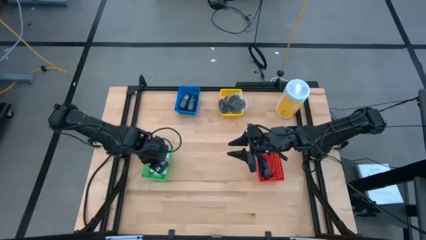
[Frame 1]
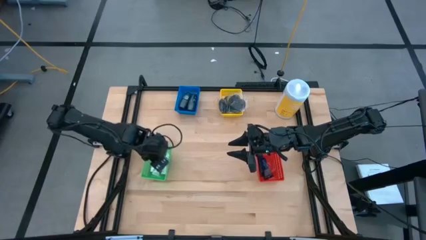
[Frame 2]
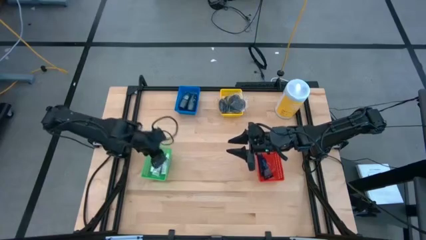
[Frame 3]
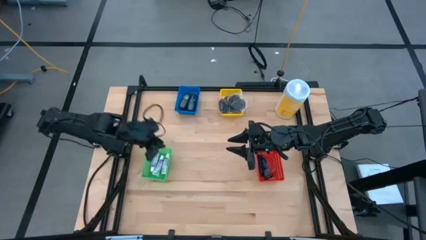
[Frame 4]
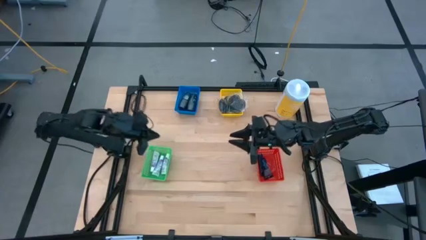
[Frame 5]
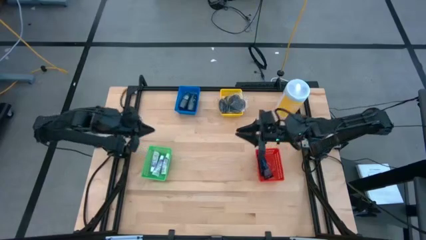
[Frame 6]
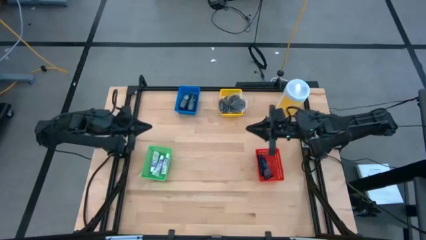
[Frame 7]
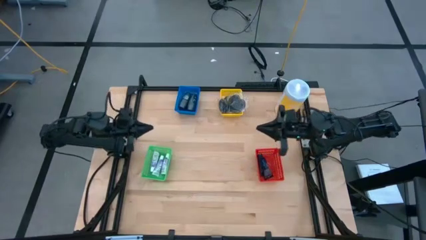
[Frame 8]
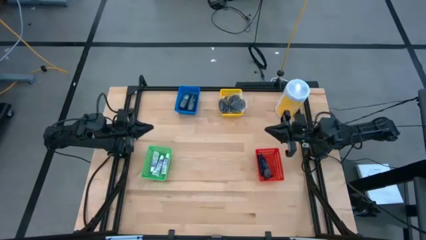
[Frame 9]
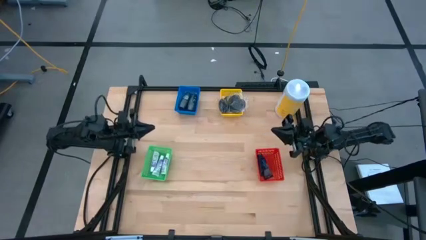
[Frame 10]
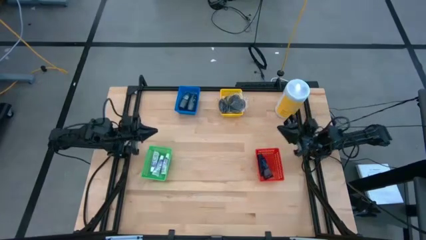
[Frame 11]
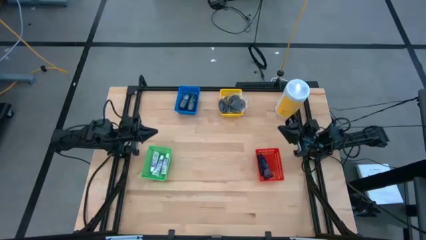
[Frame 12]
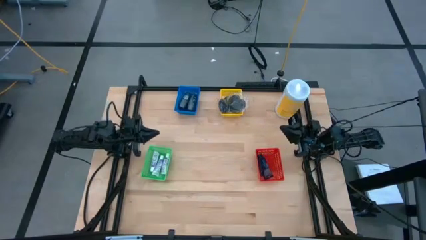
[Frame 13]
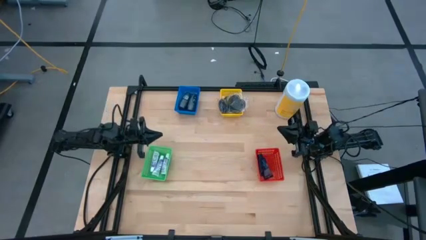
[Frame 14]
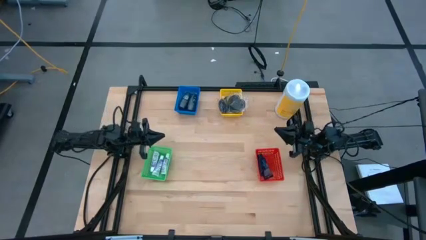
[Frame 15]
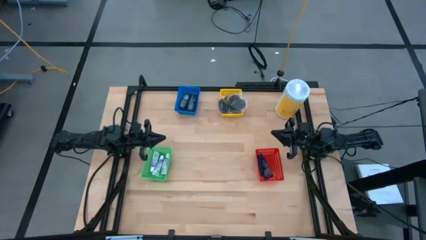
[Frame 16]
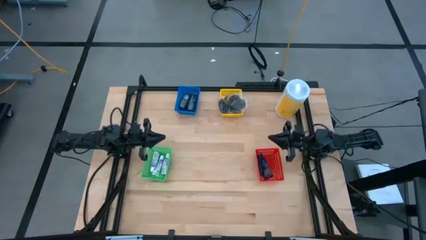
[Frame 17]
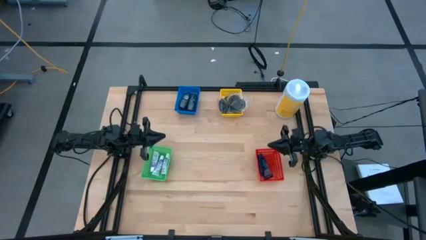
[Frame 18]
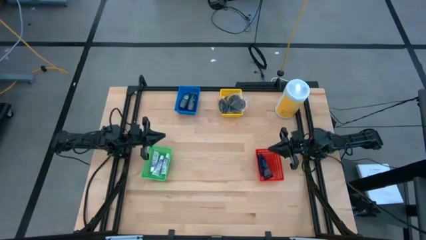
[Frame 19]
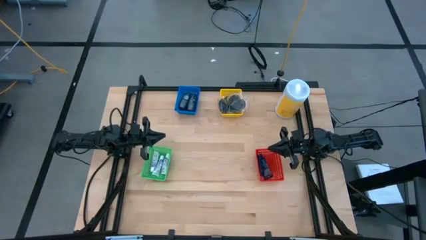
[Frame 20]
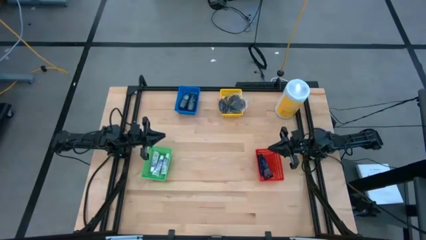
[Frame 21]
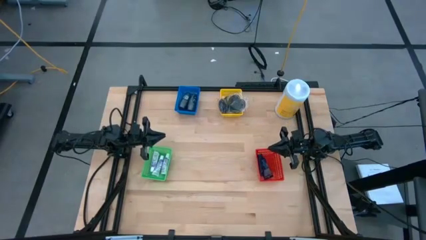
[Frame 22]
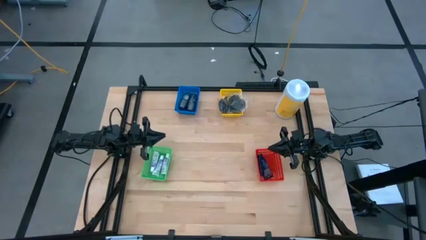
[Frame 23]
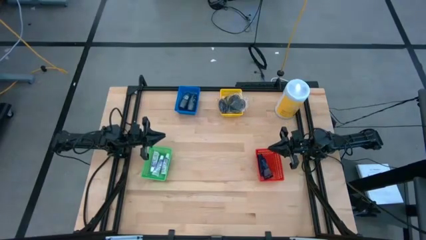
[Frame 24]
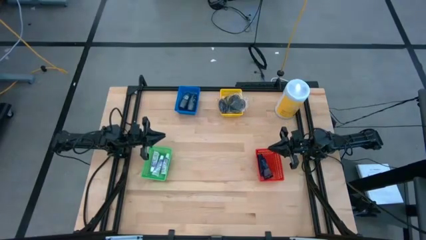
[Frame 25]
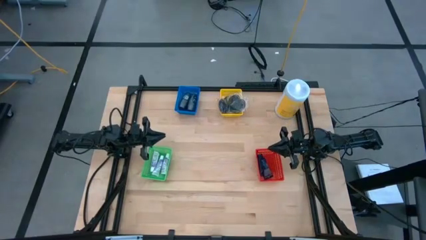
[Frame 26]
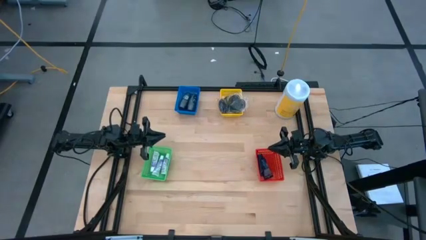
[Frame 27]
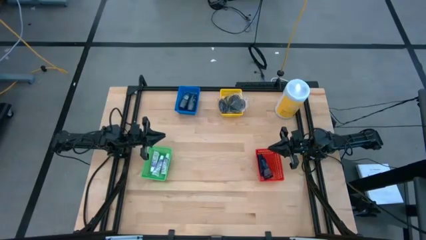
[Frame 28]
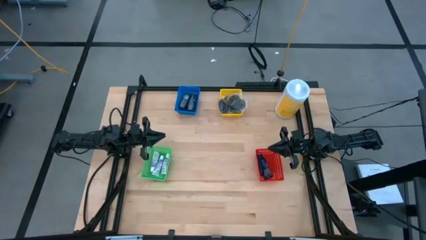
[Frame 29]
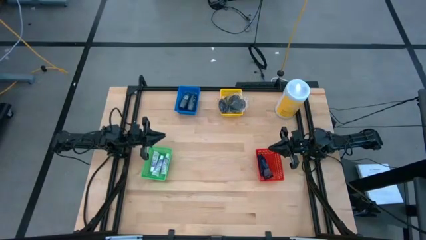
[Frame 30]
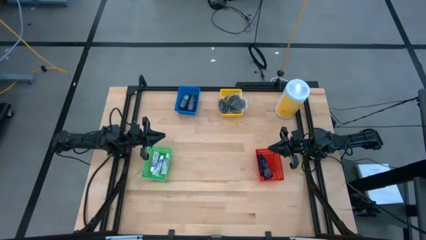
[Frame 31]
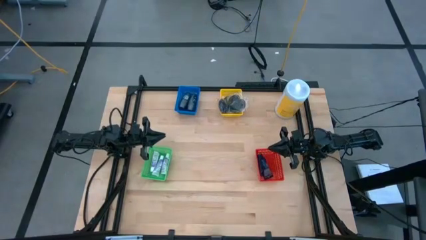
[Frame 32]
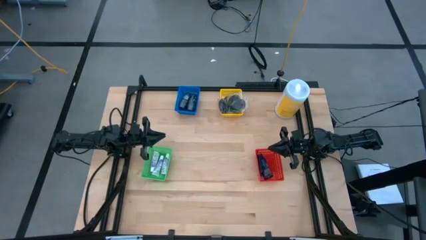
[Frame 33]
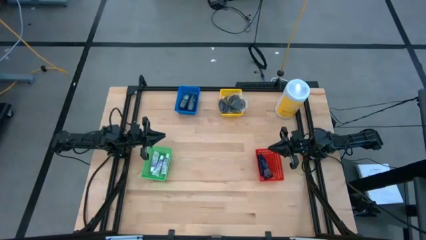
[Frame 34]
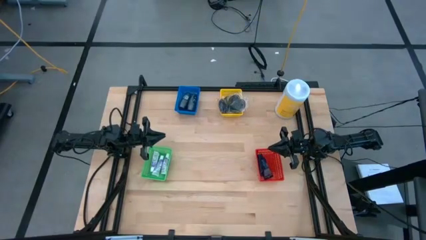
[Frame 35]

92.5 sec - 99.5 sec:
Task: Pick & Place Travel size toiletries
Return to Home Position

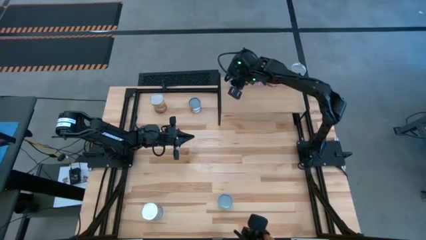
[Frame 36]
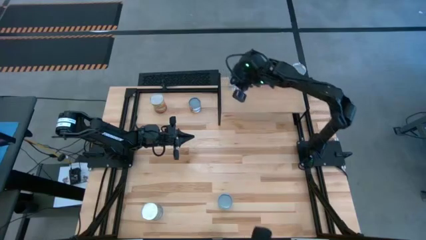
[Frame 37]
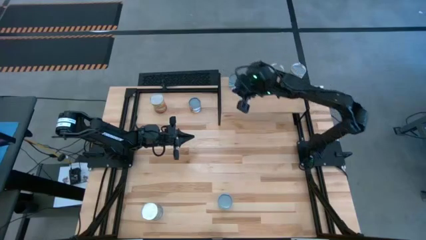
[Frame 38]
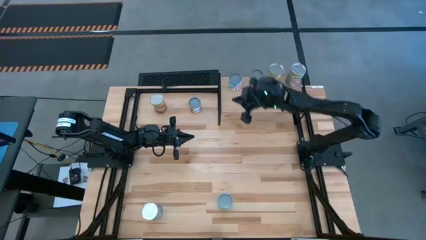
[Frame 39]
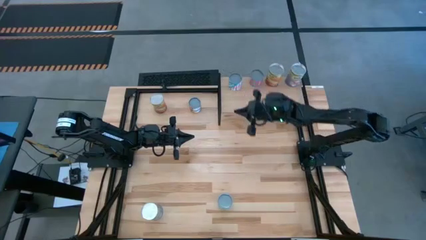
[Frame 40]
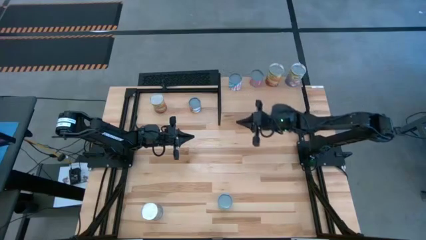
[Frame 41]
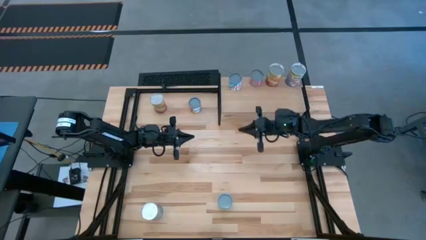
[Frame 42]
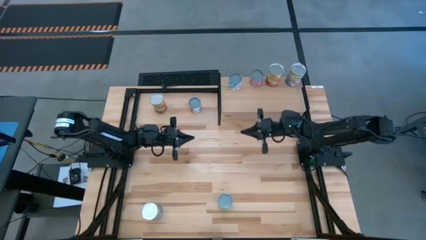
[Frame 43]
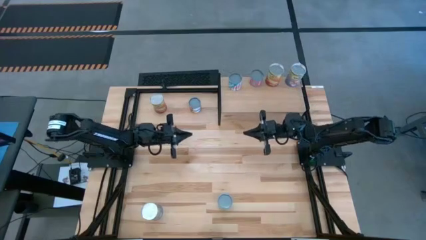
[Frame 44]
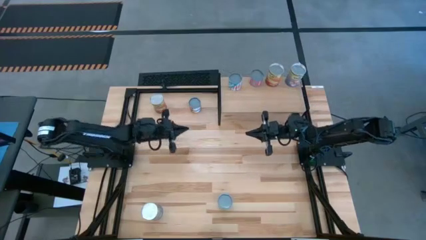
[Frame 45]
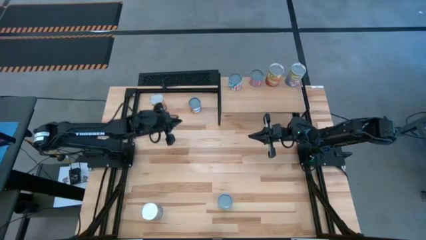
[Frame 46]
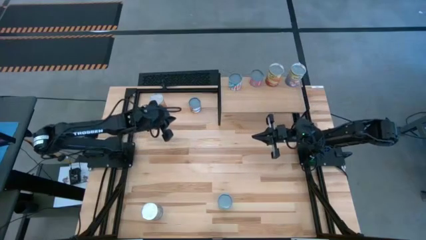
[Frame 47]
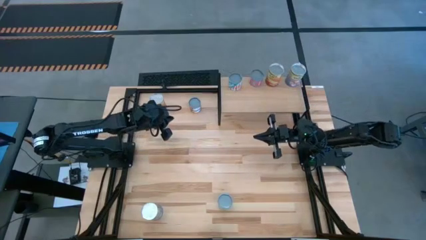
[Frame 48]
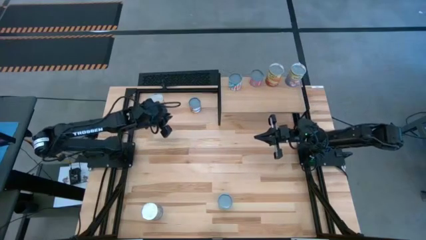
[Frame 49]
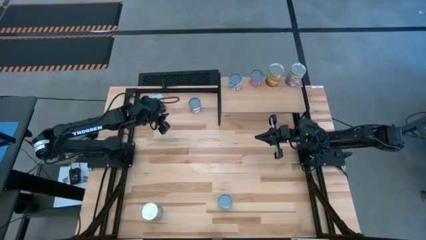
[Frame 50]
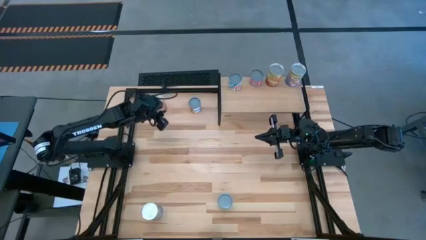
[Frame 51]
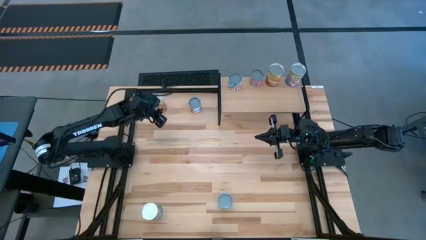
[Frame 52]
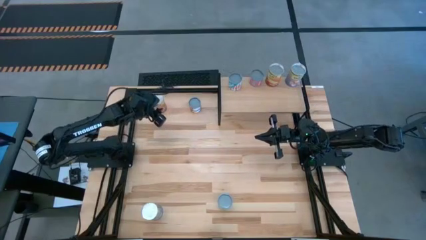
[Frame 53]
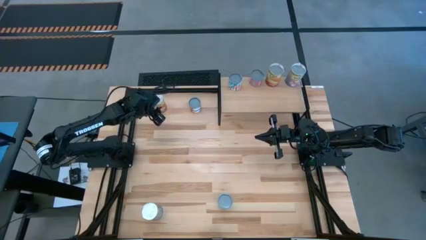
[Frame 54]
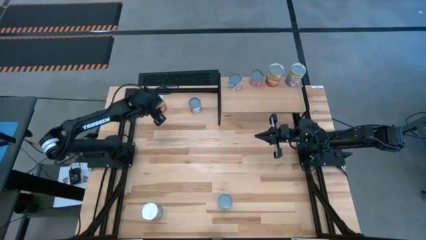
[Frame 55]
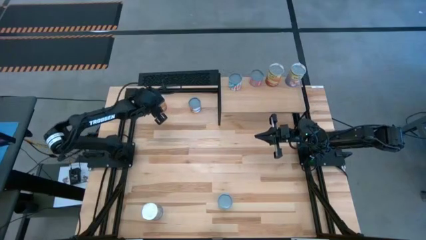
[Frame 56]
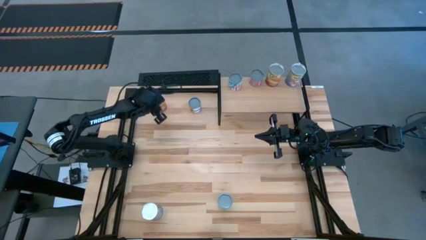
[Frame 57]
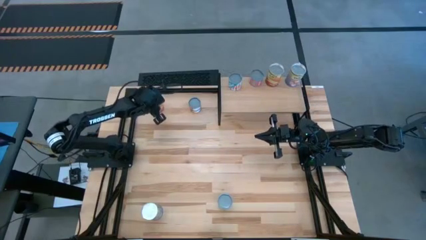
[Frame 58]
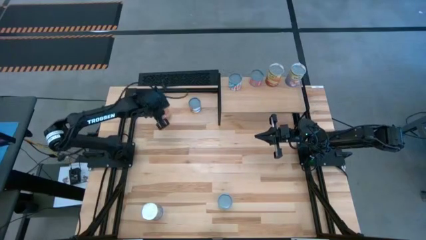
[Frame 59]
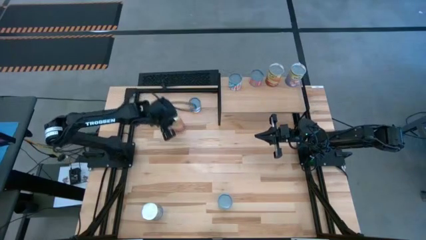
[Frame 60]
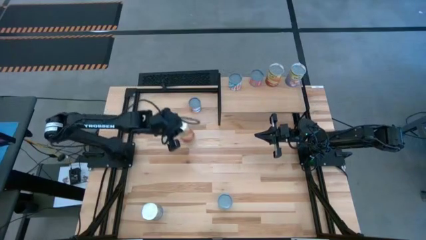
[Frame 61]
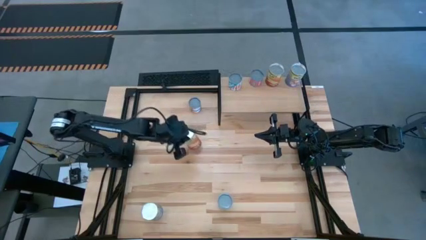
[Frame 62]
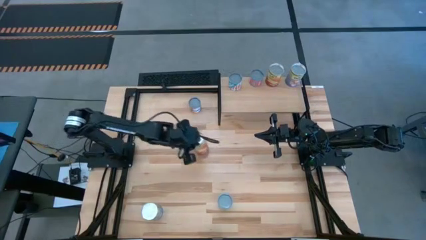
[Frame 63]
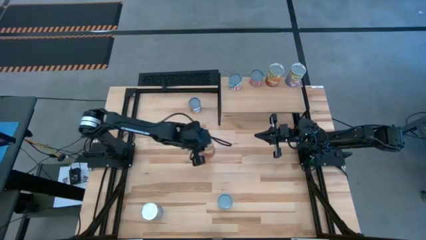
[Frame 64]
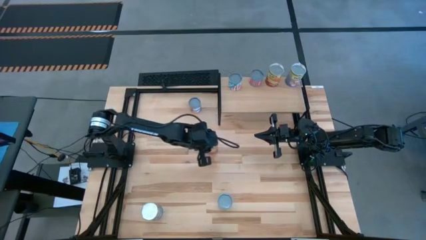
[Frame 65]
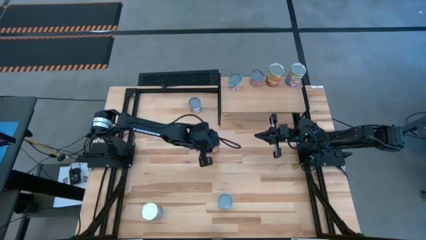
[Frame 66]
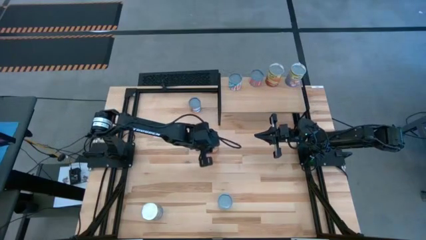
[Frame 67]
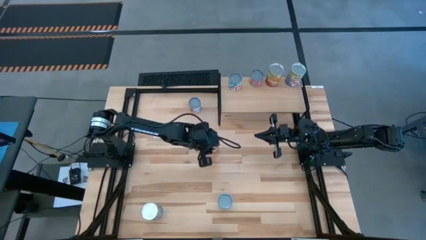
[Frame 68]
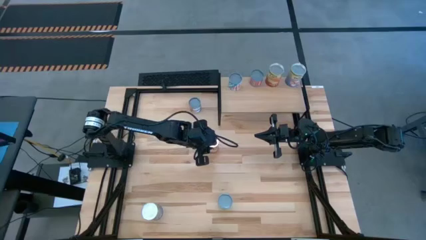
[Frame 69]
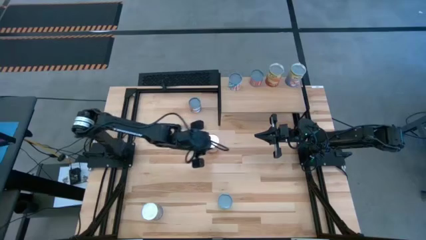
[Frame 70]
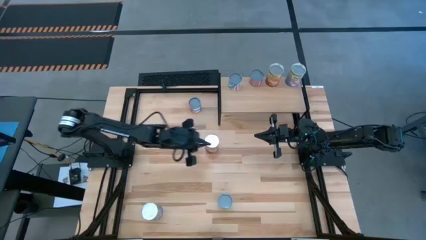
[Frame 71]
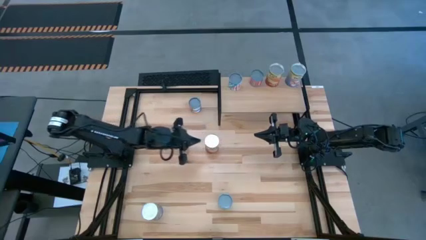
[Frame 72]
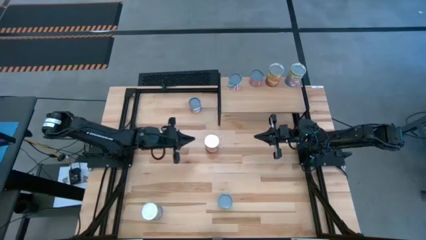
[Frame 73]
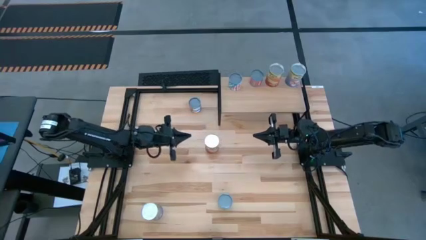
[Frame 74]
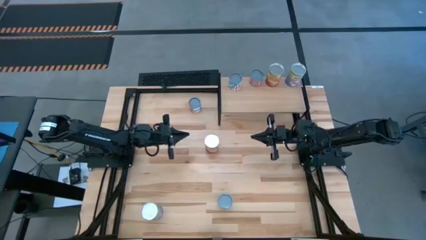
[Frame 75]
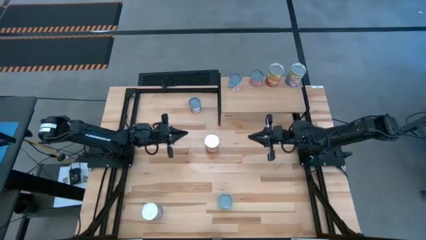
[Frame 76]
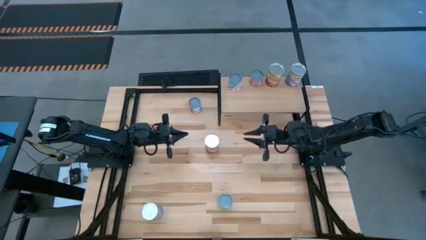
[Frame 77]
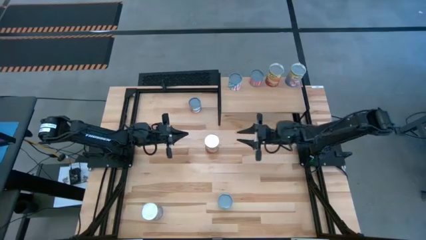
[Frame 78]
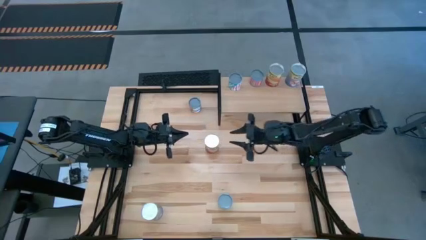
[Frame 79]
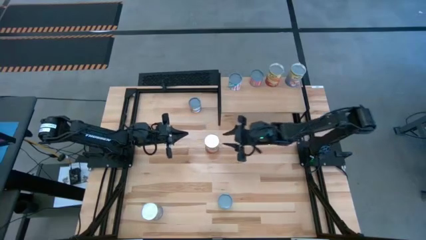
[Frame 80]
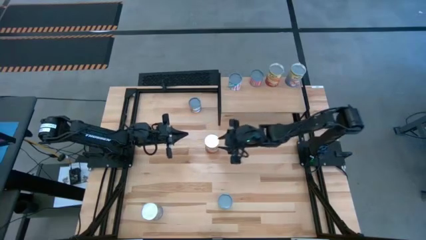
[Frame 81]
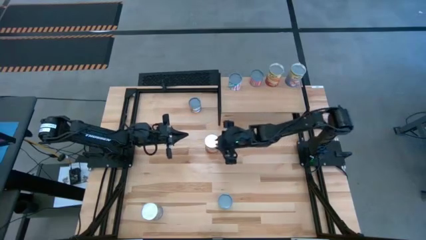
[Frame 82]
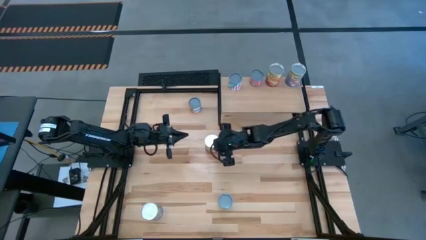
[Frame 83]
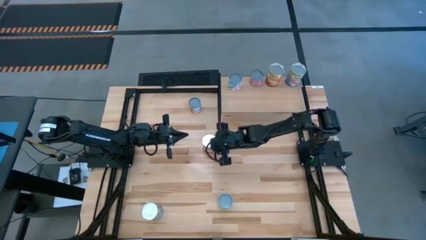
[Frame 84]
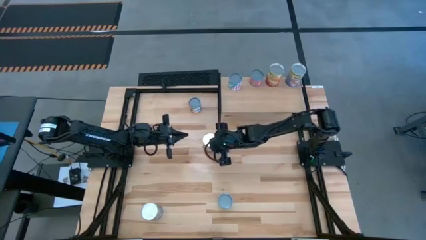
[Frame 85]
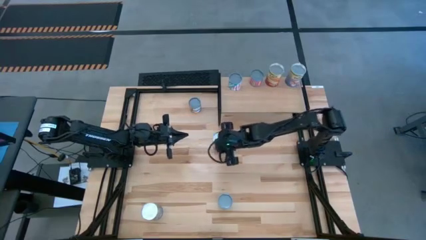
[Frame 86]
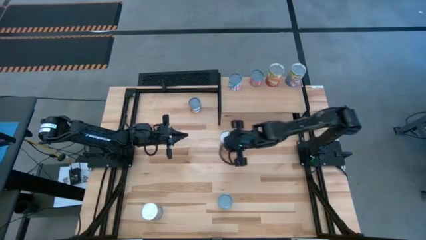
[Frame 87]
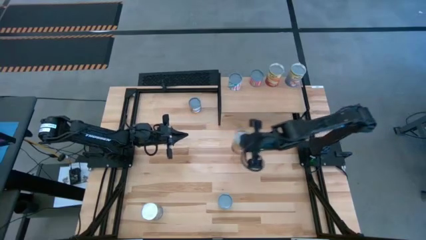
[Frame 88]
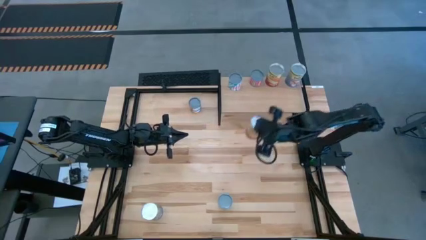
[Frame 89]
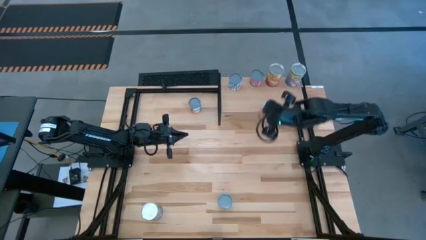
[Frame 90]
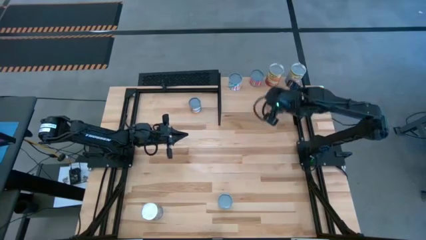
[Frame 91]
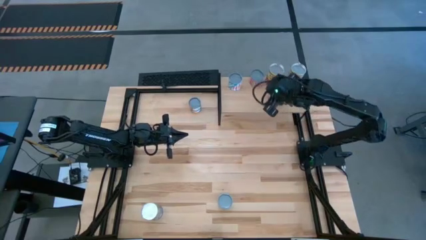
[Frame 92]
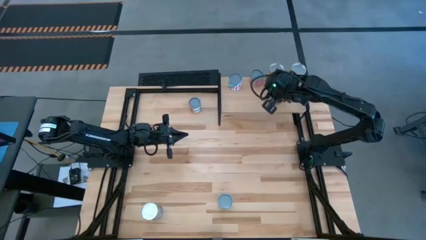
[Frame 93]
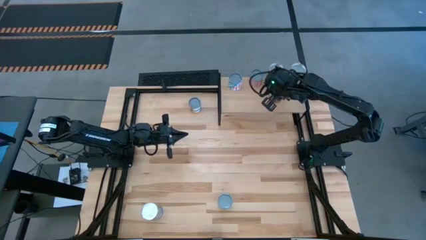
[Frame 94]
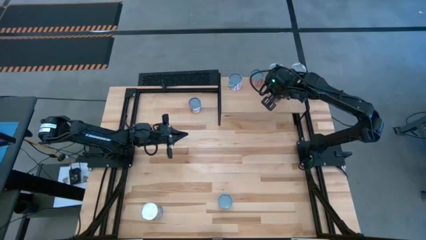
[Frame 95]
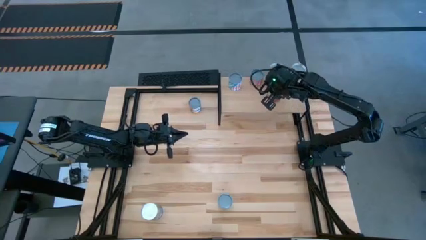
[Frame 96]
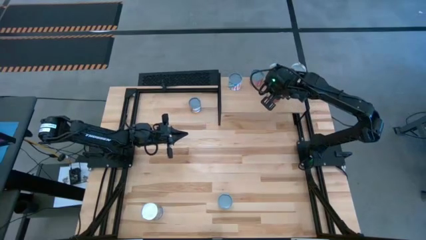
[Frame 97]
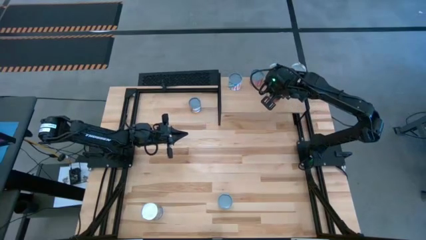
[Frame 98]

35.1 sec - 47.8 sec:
Task: Pick and place cans onto a shelf
Put the large canned corn on the shelf
